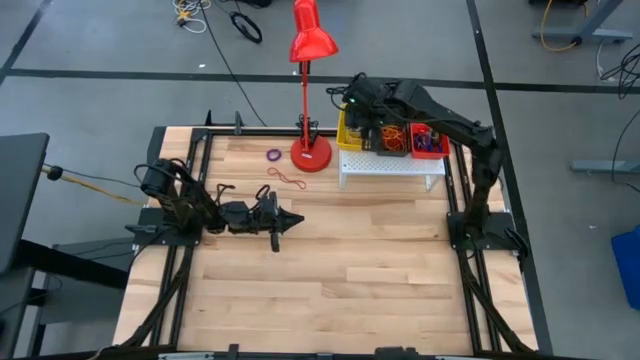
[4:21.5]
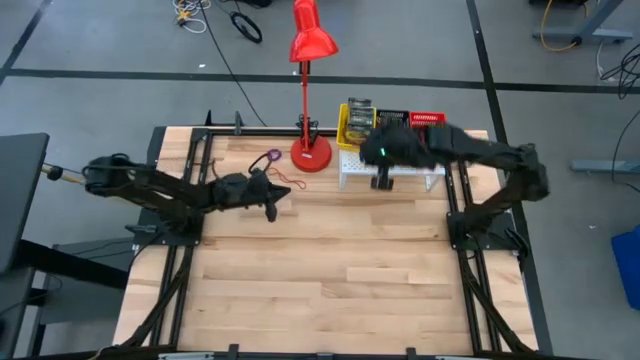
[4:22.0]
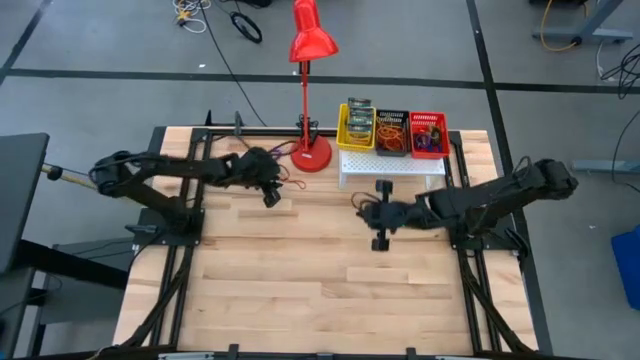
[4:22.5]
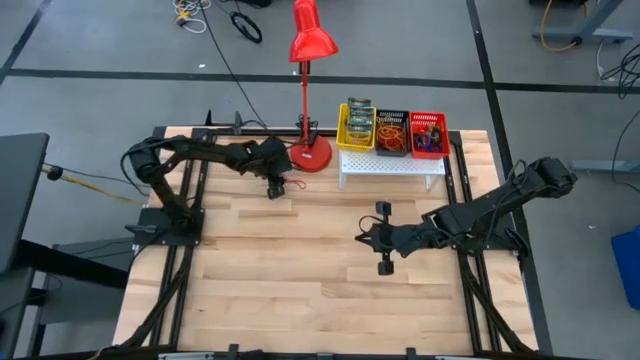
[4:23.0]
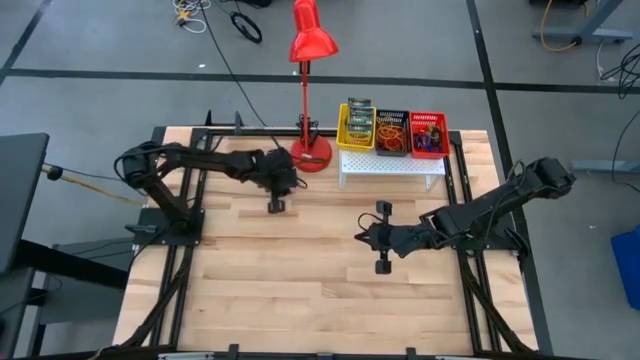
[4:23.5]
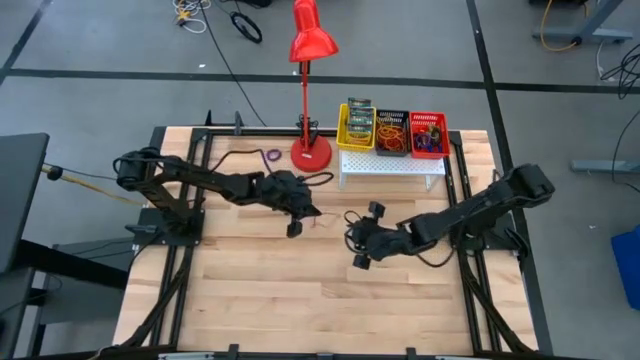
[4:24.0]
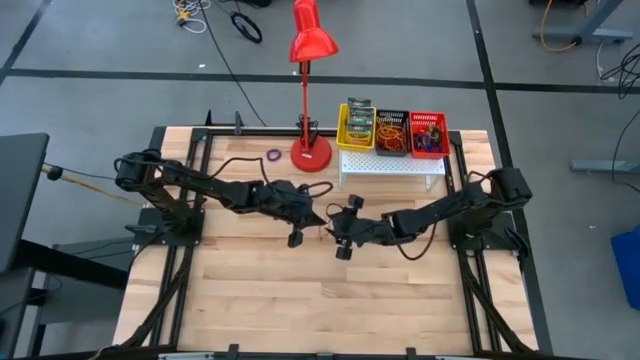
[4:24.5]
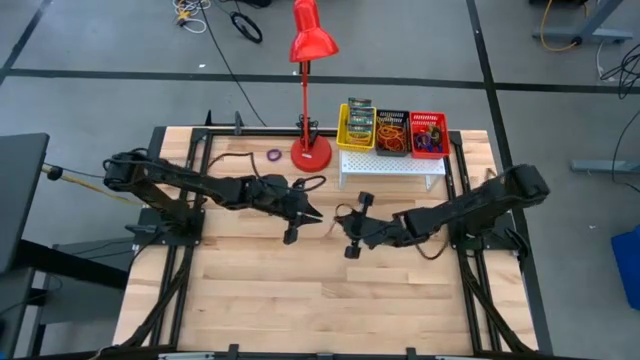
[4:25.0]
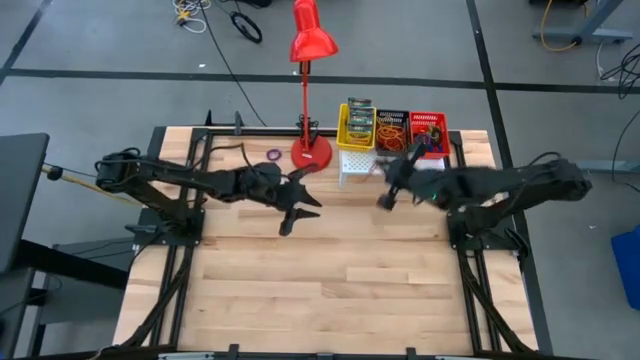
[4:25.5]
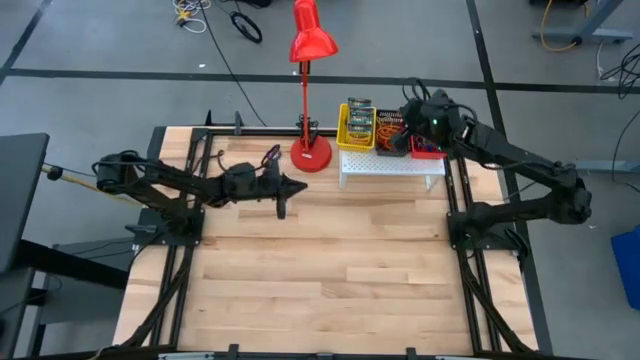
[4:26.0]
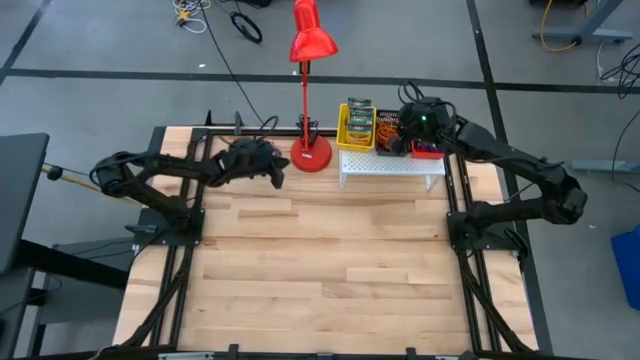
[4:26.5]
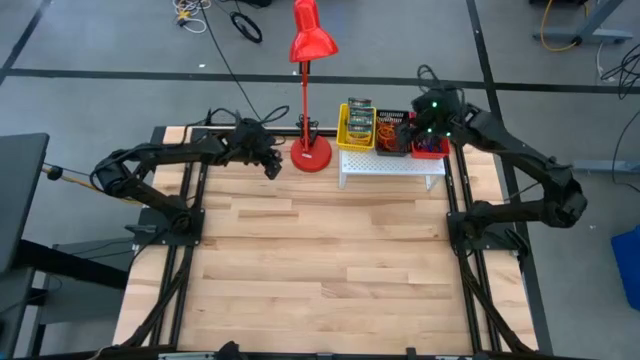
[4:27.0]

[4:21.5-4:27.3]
Task: Pick & Place Office Desk Supplies
Put the red rubber band into the black bin on the shelf

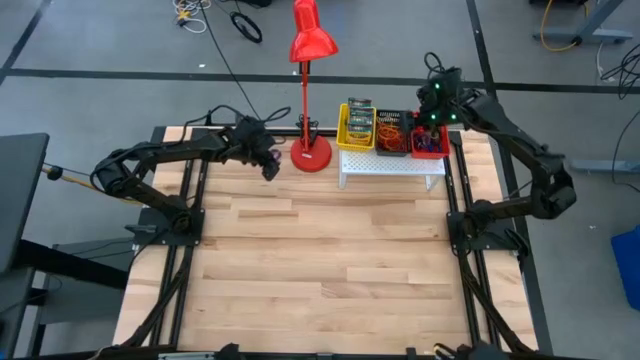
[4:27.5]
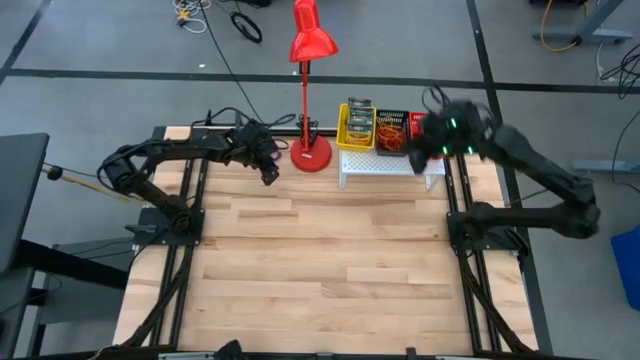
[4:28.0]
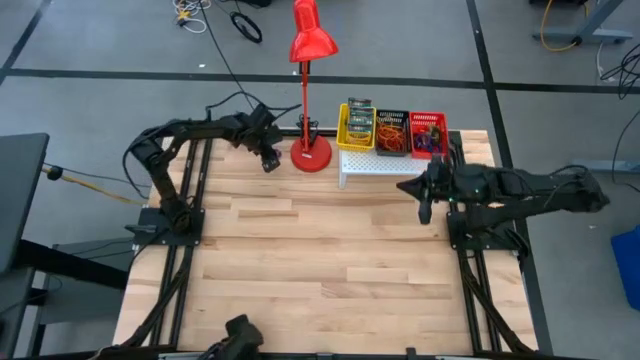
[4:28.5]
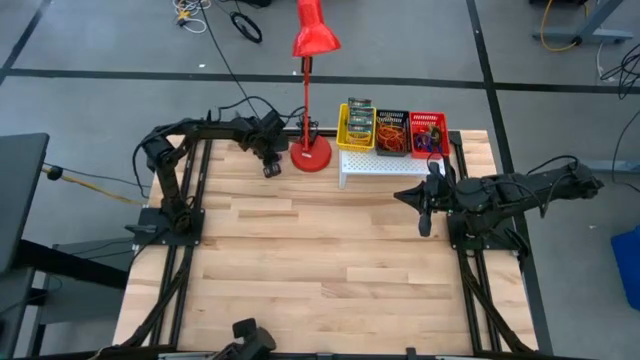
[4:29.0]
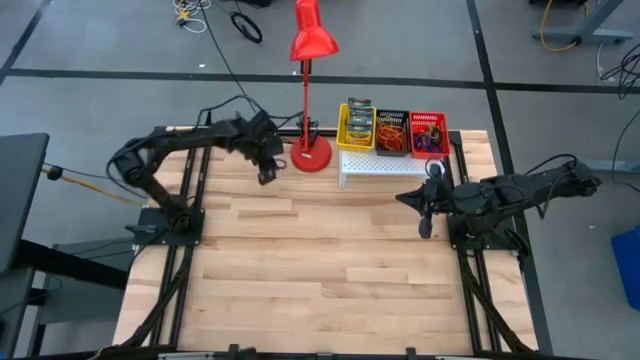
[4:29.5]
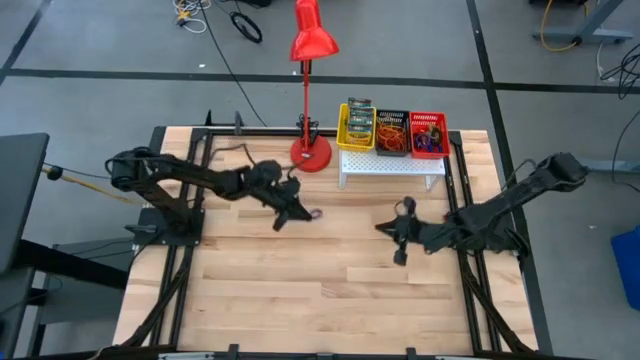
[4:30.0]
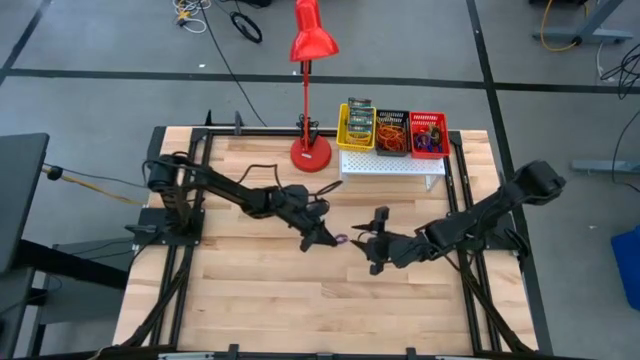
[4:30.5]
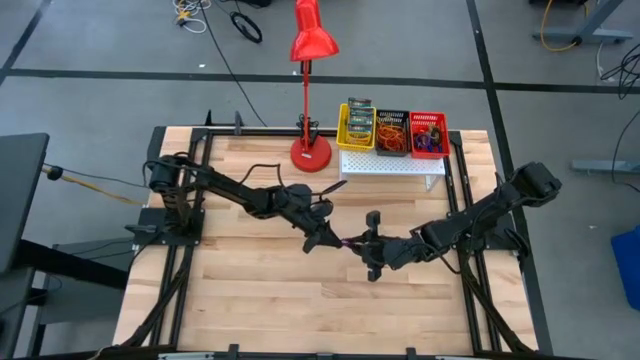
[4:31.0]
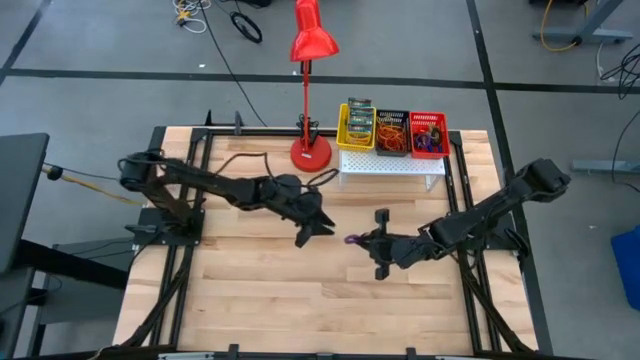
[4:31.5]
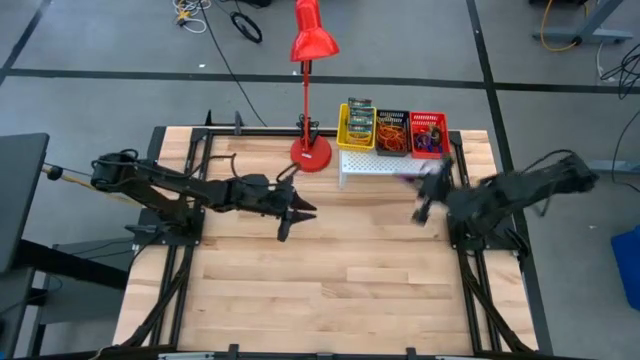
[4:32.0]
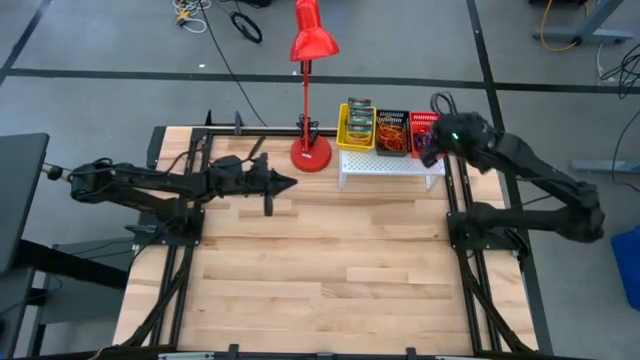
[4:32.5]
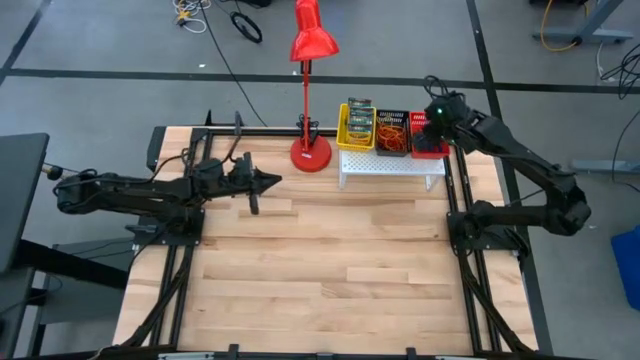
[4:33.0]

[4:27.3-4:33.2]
Put the purple spring keychain into the red bin on the shelf

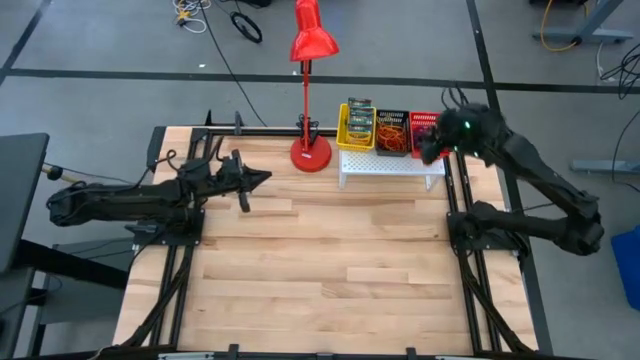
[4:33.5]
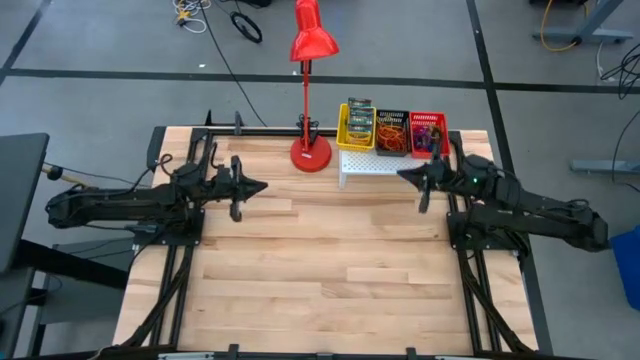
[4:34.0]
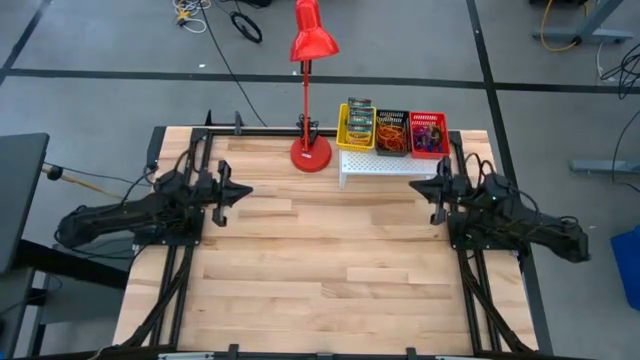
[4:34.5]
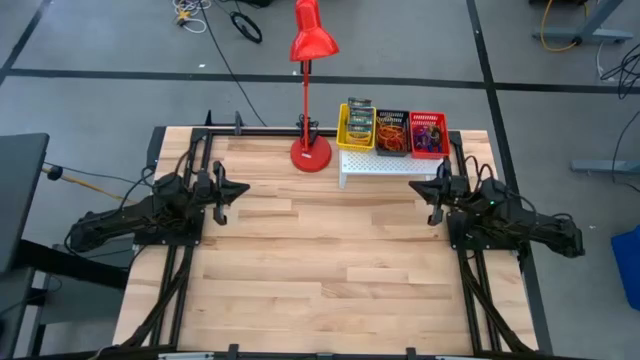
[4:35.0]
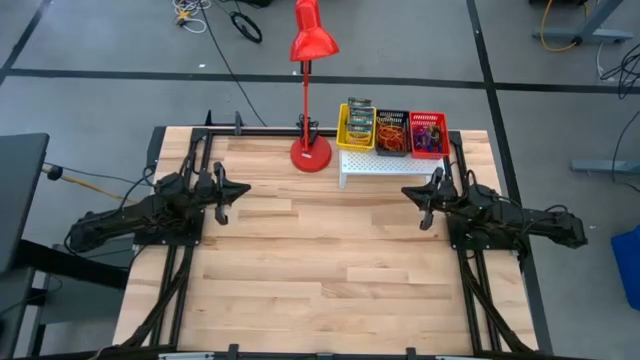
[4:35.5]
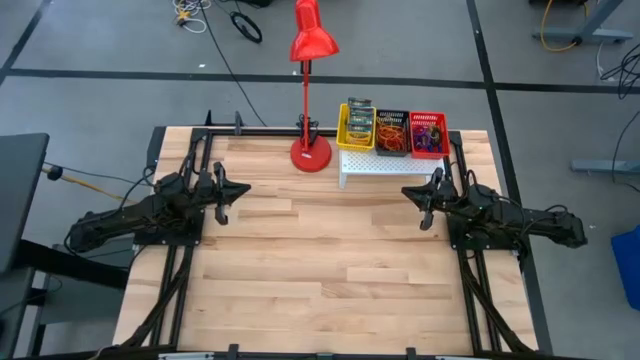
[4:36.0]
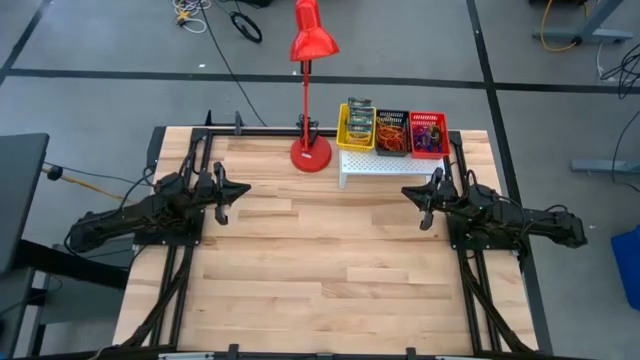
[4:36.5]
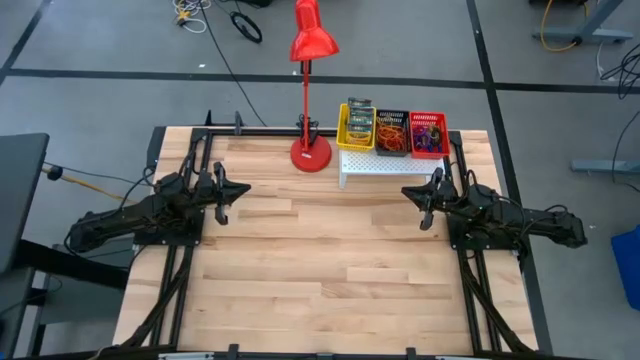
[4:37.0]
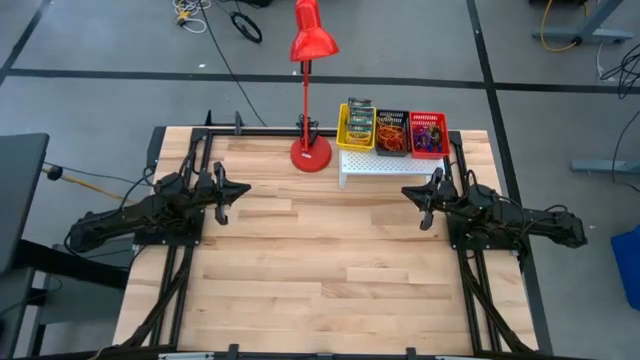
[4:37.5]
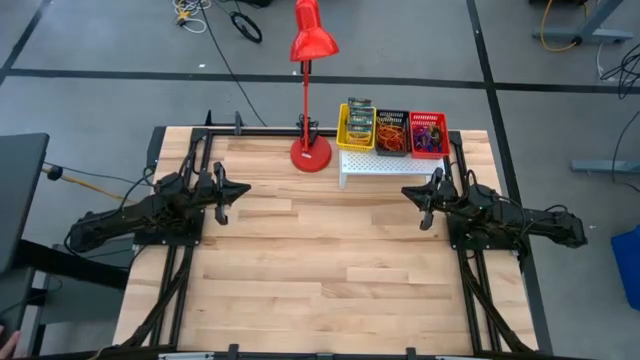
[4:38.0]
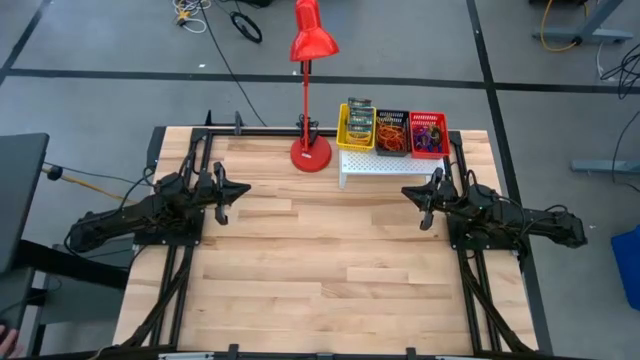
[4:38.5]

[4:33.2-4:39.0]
Return to Home Position

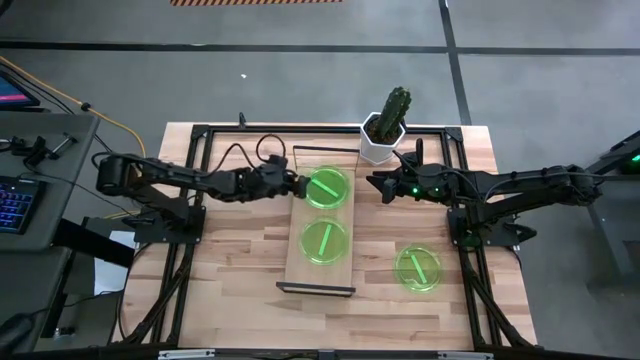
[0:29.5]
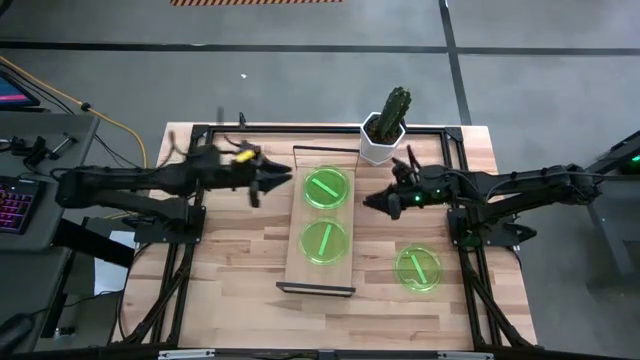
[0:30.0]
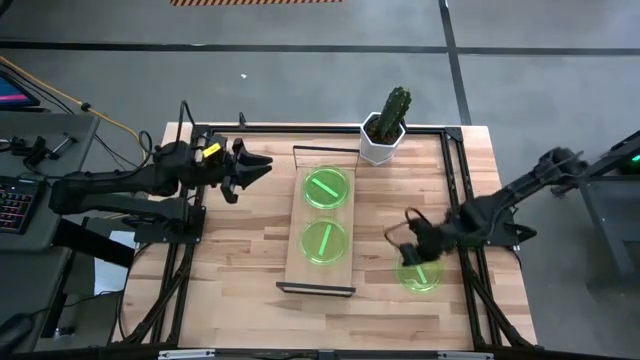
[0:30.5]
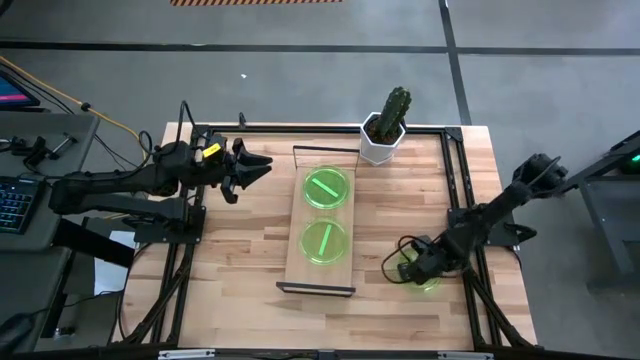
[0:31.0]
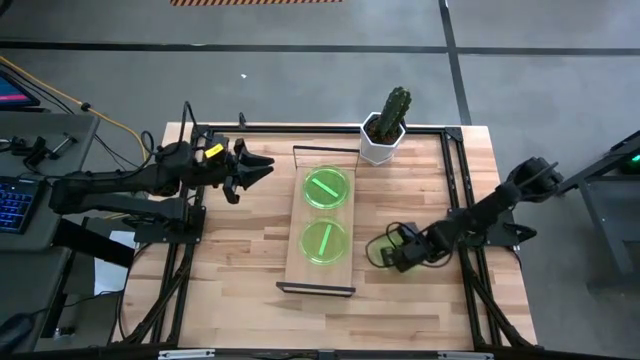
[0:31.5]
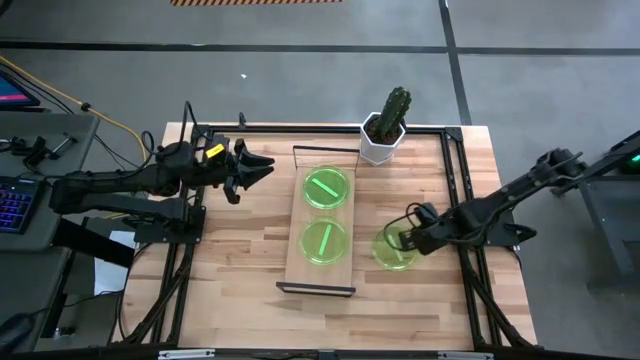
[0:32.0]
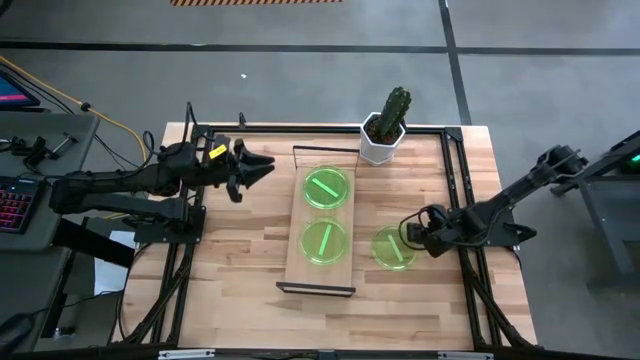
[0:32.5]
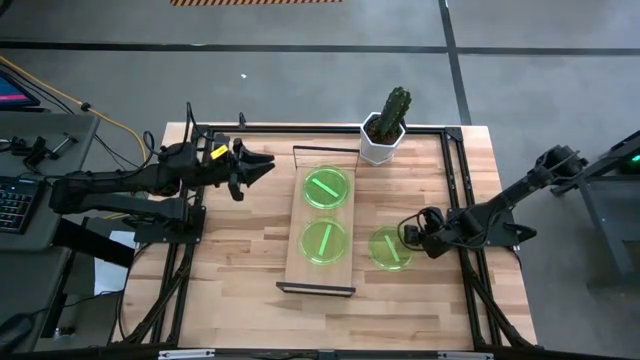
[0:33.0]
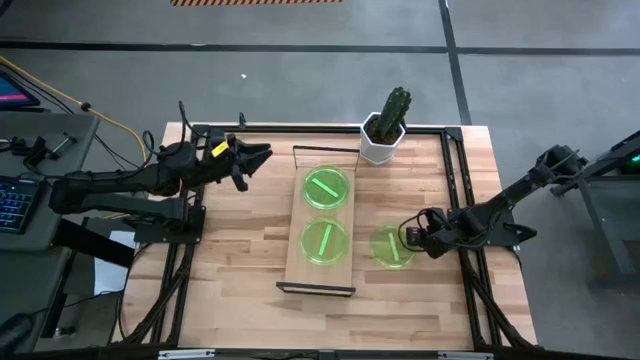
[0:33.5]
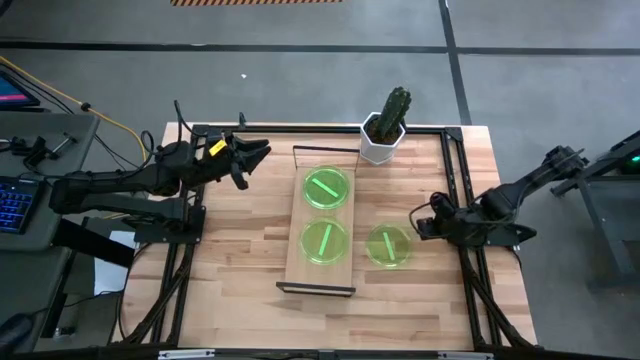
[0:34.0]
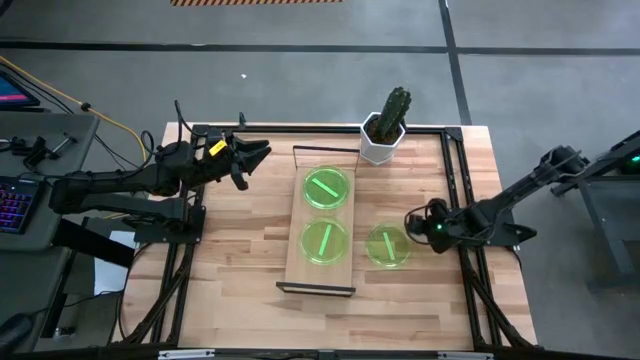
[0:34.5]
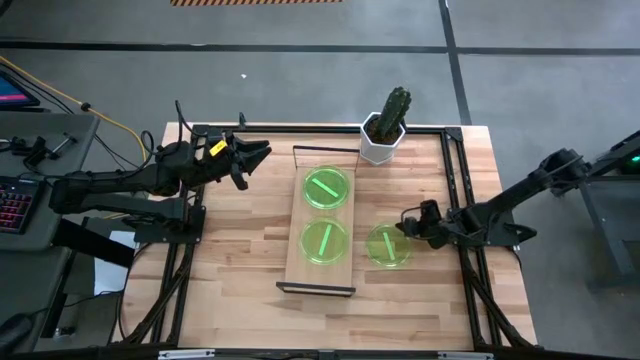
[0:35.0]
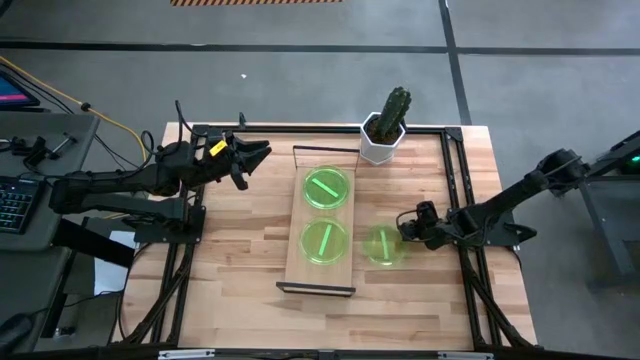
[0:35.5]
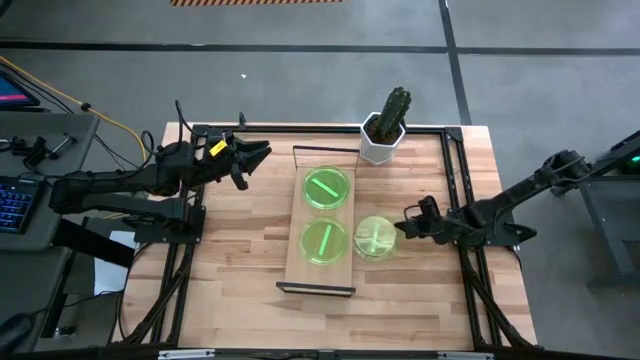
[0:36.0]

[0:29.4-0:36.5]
Task: Place and stack plates onto a shelf
Stack the green plate on top of the green plate on the shelf
